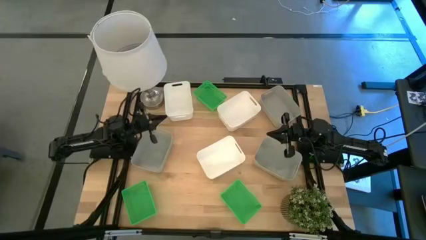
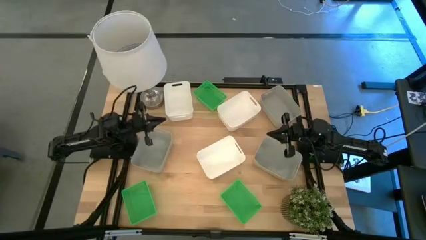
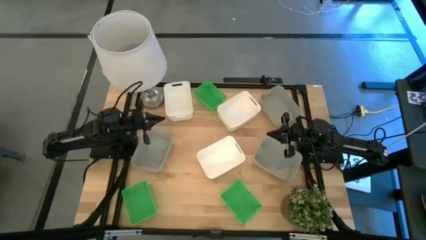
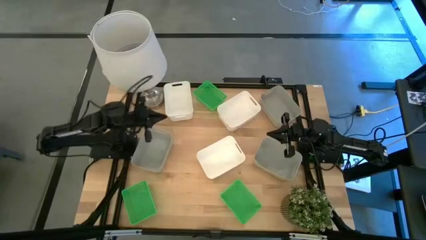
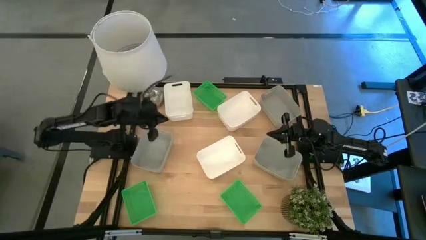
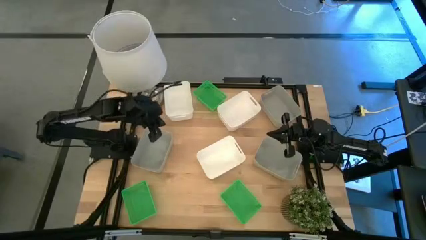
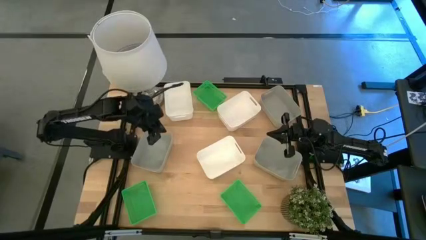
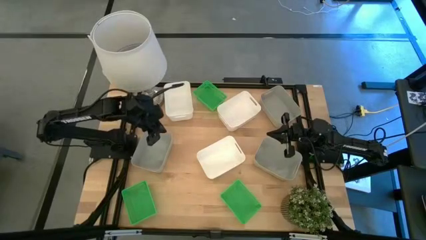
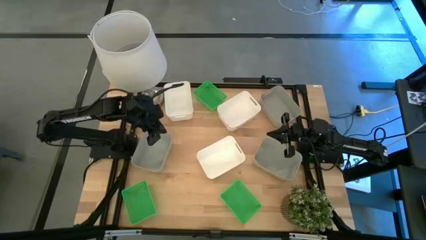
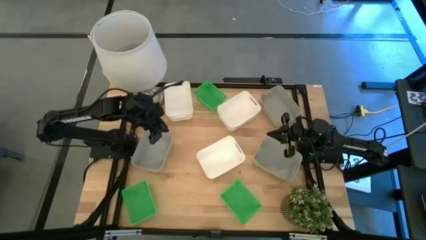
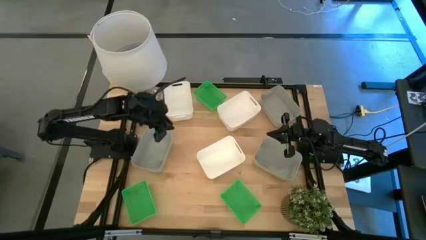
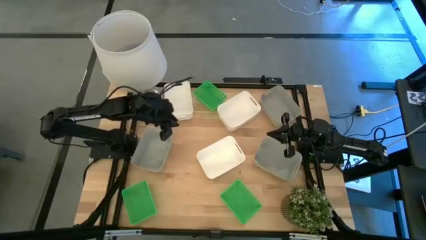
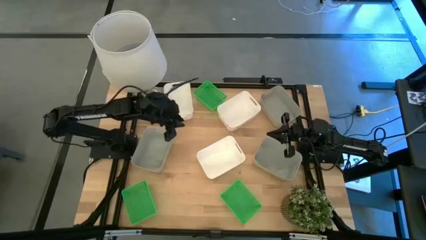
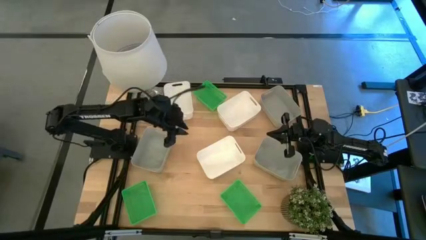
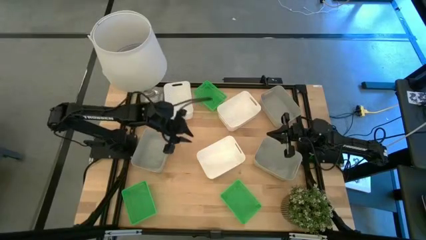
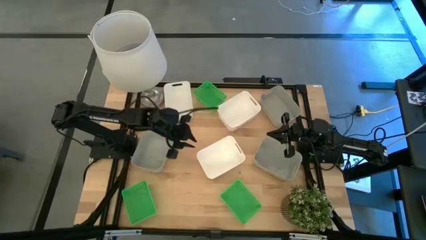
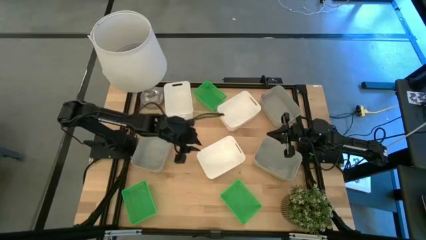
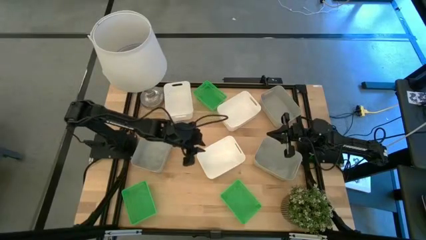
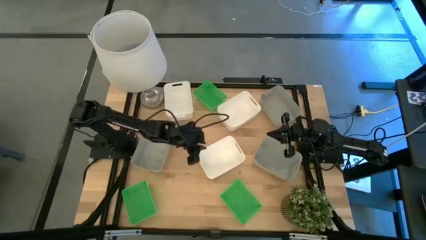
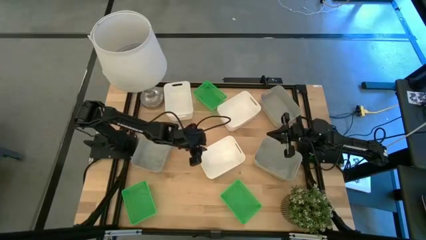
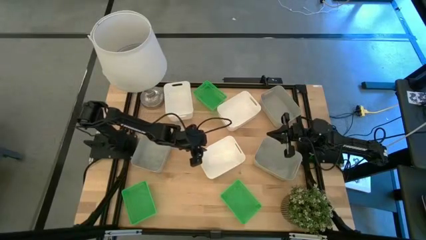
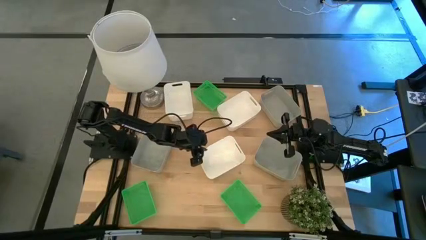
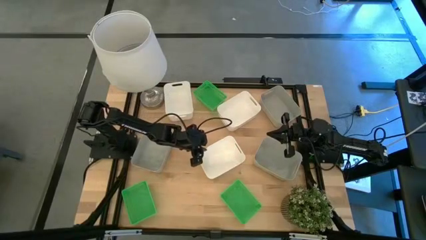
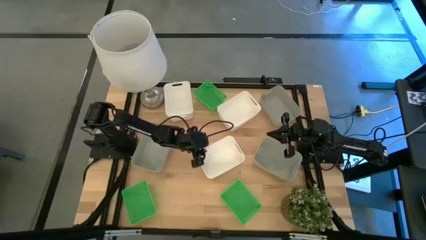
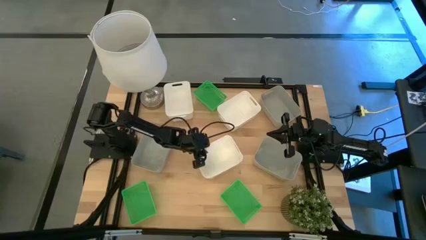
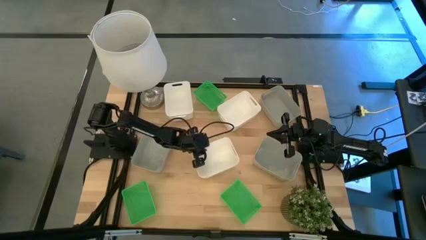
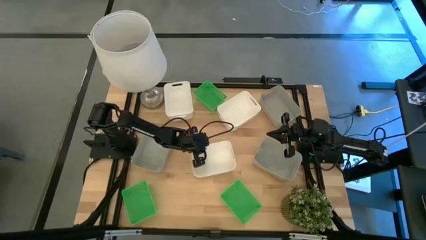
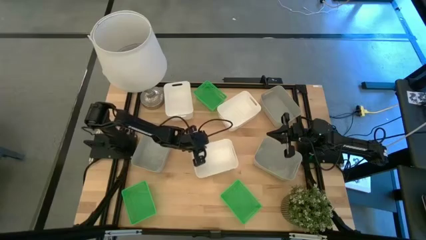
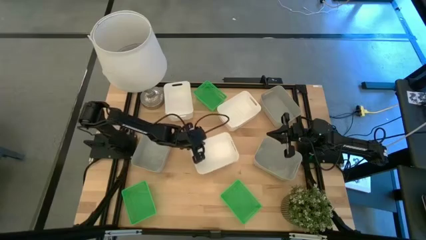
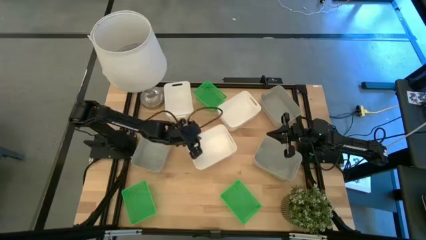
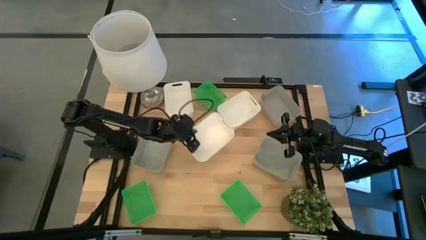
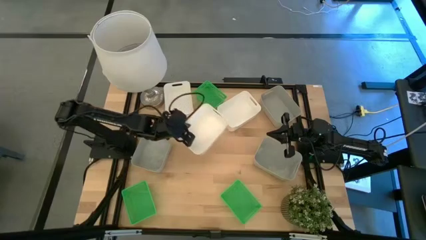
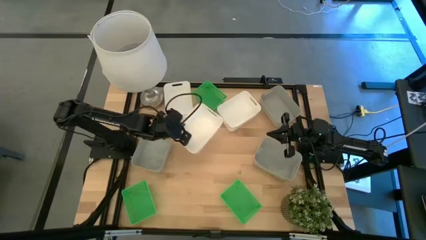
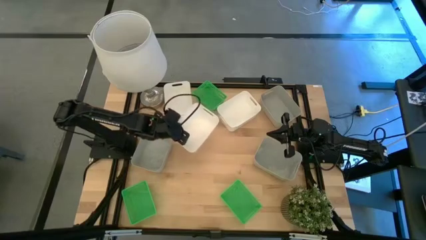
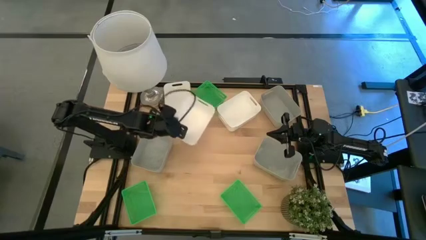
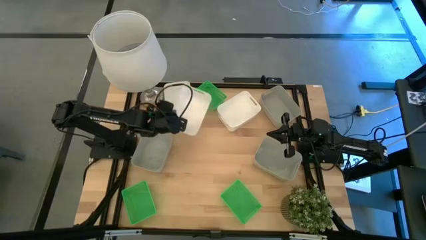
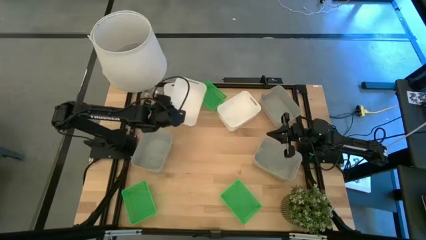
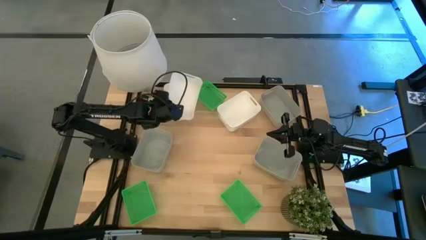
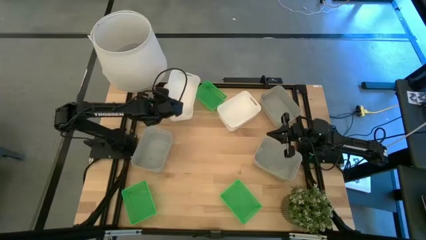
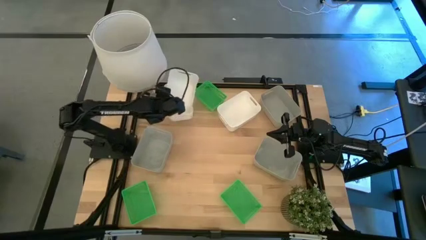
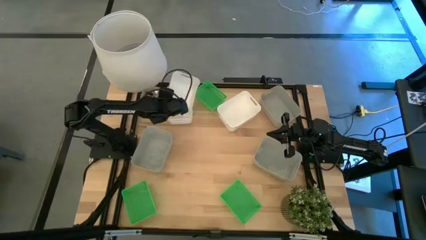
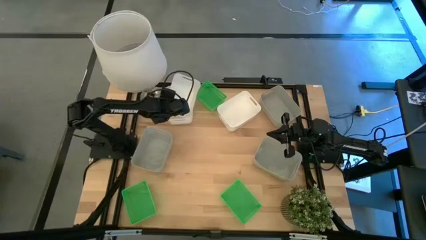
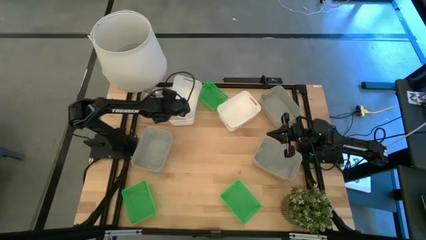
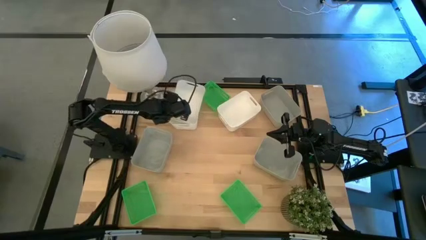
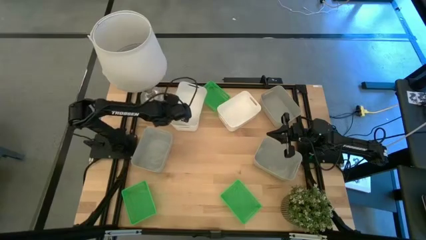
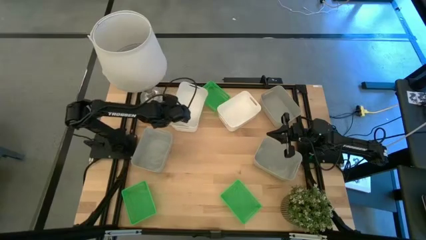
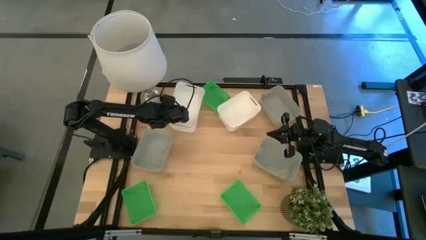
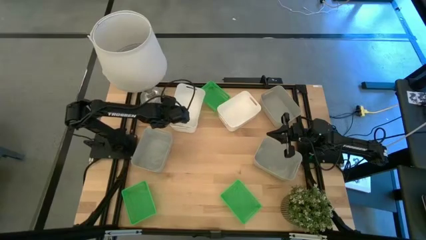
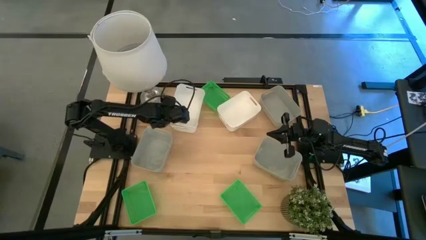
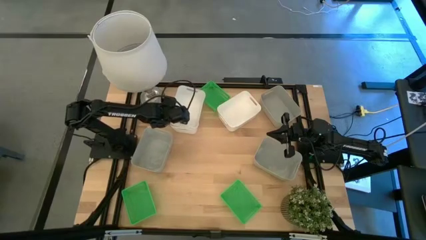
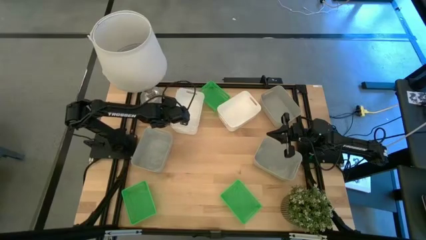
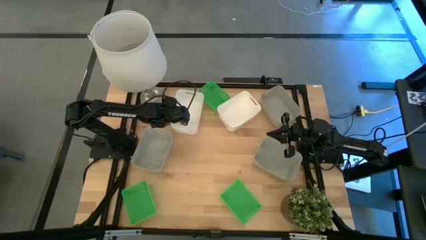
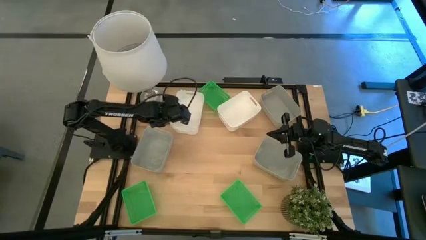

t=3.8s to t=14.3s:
Stack the bottom white bin on the left white bin

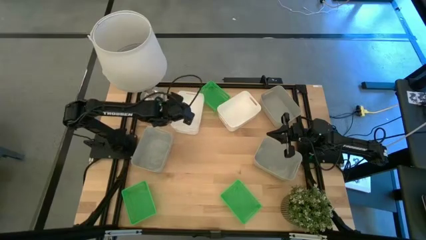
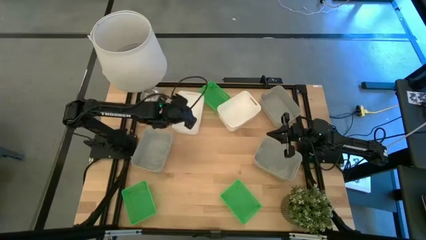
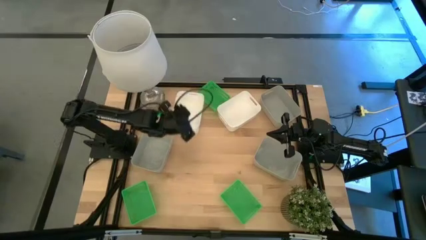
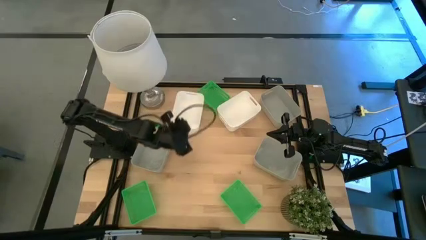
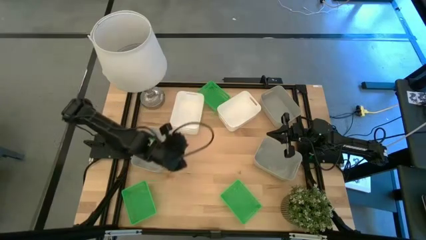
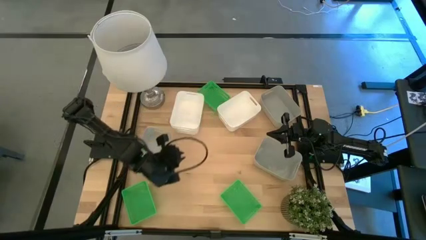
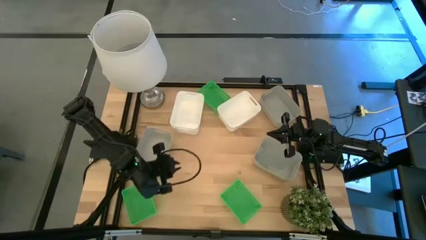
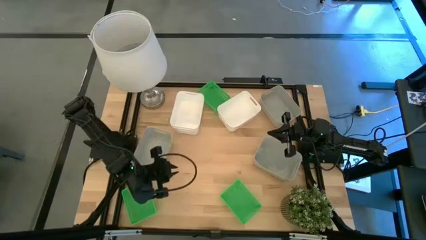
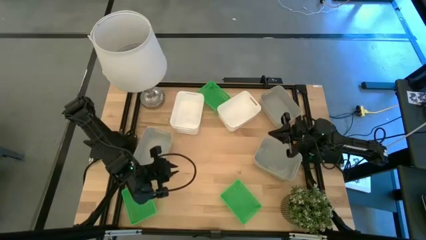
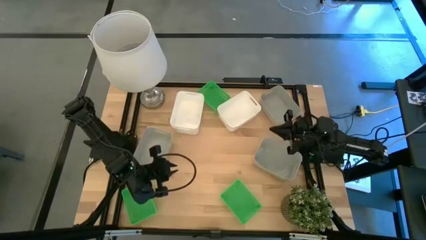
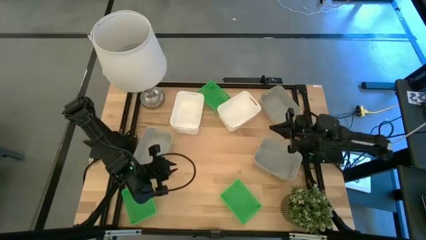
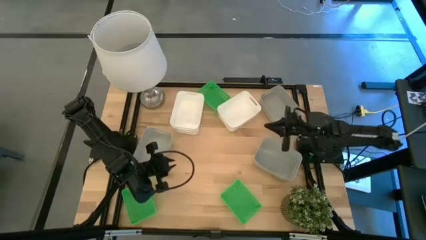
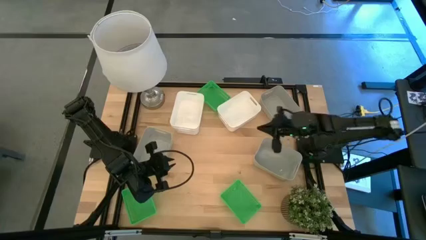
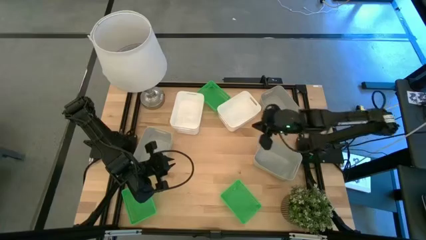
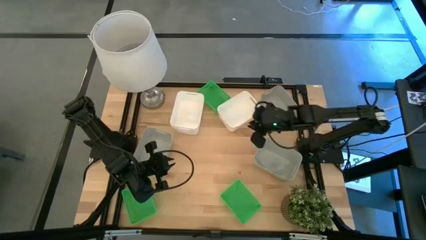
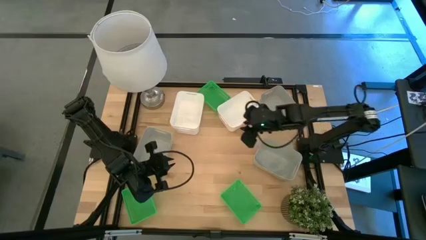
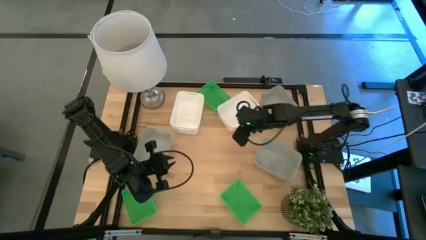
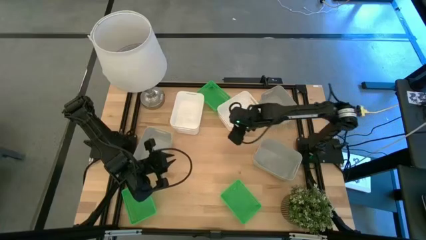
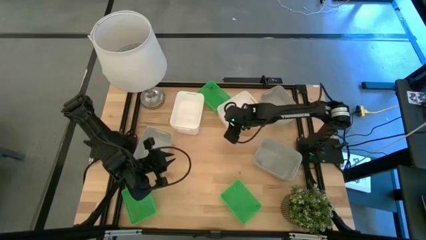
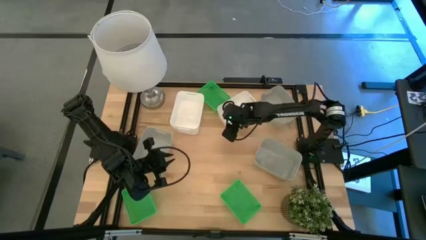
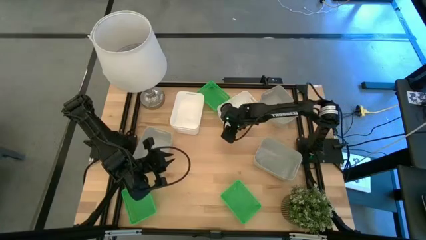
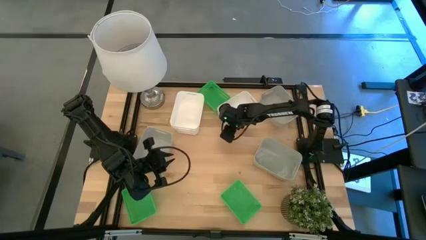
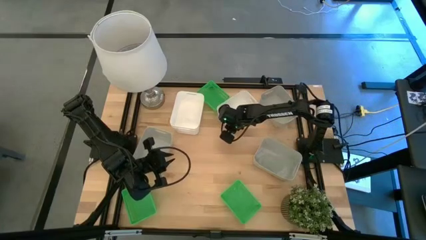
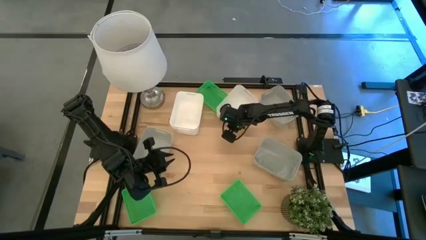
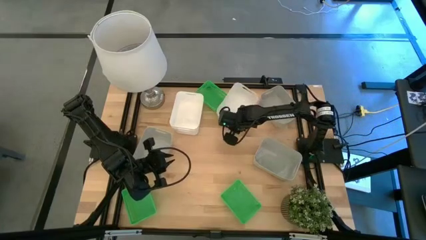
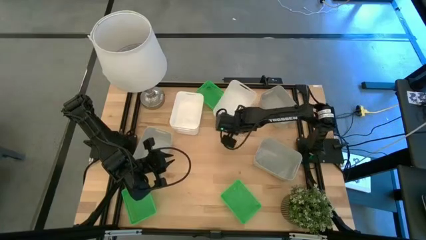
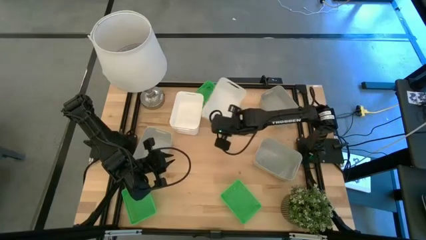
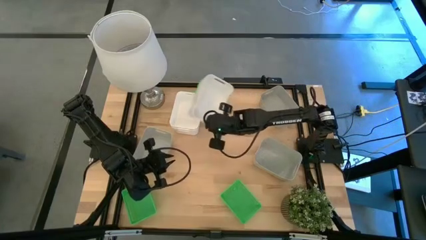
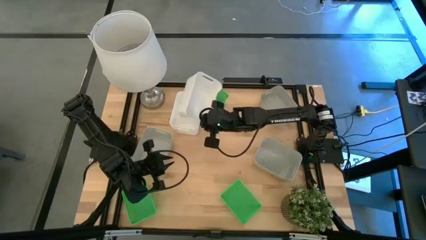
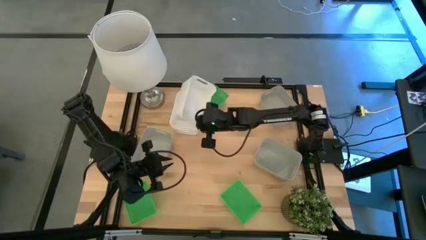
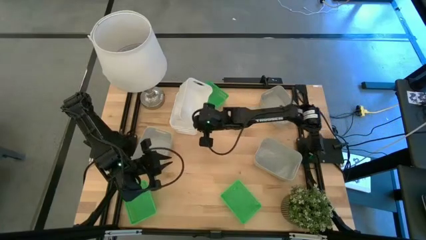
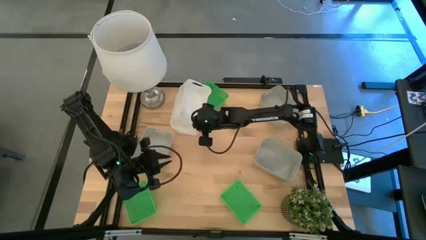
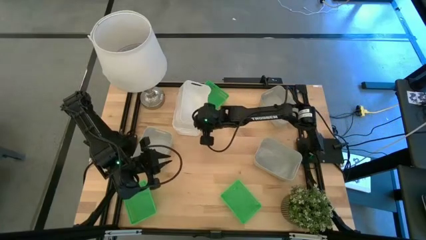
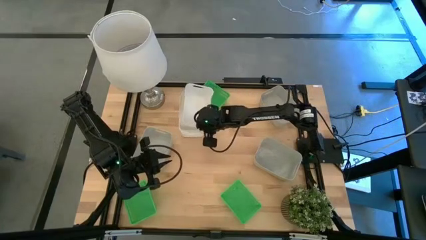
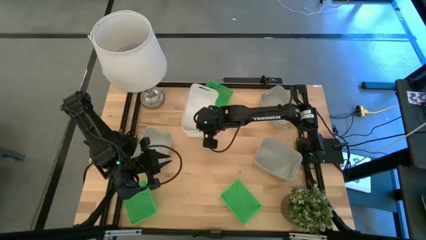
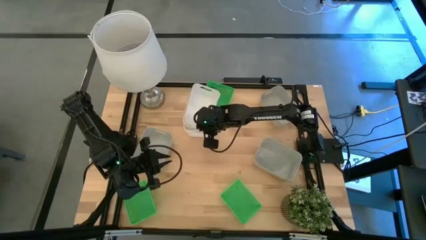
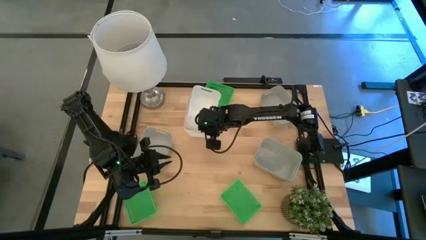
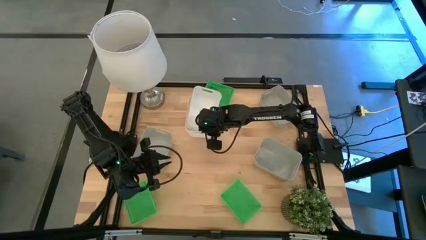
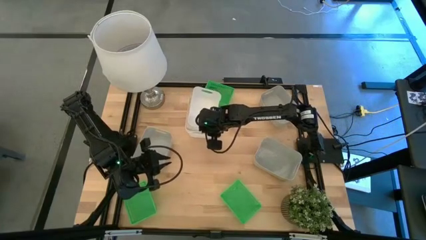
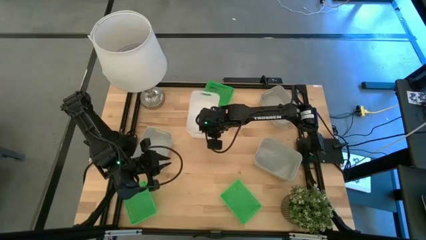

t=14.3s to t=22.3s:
Stack the right white bin on the left white bin
